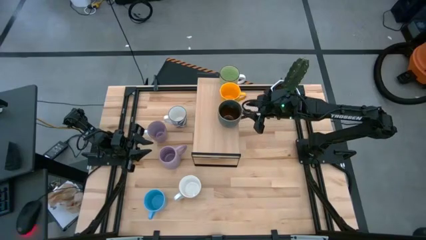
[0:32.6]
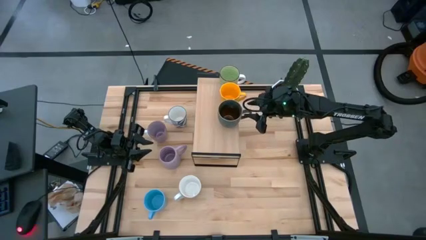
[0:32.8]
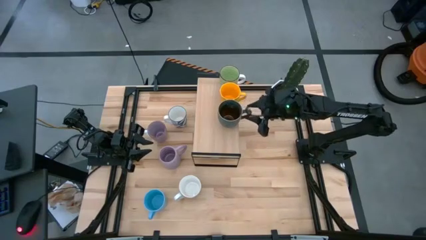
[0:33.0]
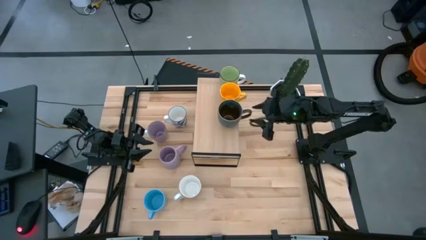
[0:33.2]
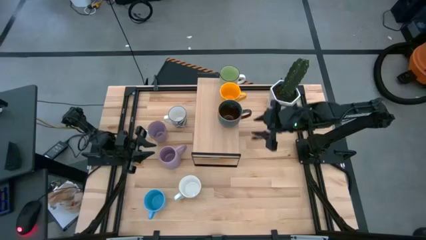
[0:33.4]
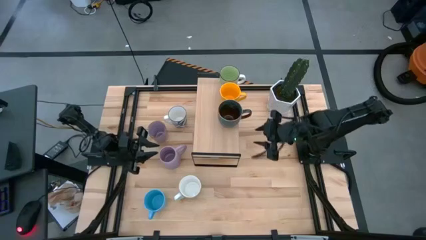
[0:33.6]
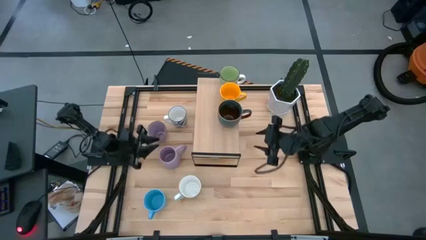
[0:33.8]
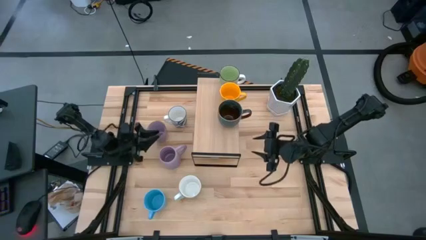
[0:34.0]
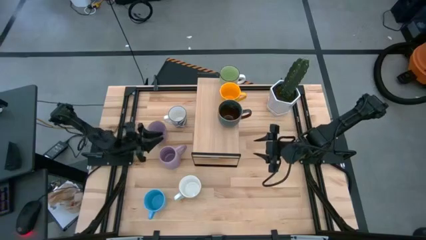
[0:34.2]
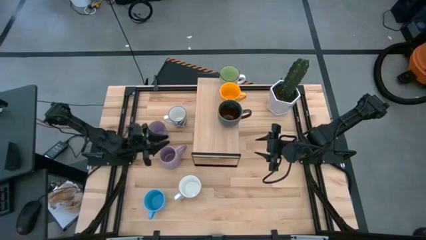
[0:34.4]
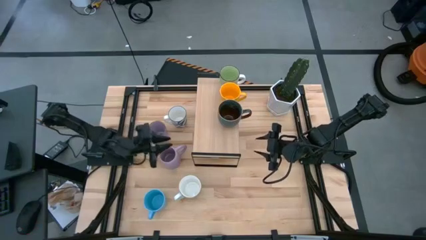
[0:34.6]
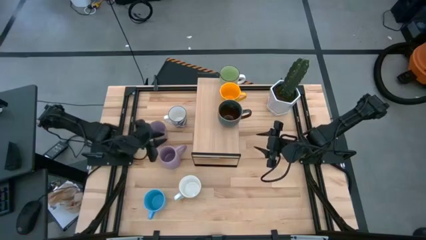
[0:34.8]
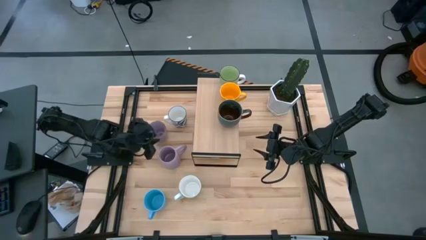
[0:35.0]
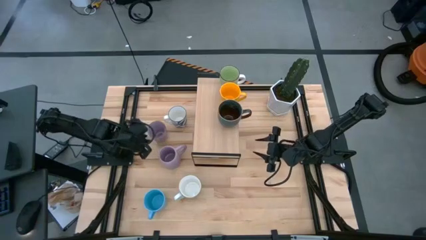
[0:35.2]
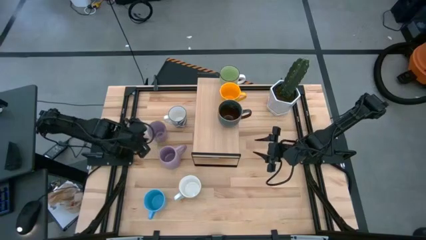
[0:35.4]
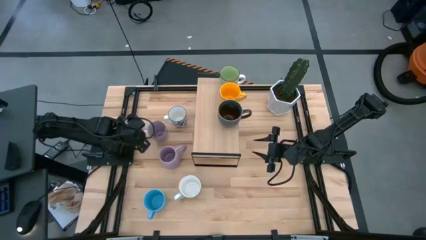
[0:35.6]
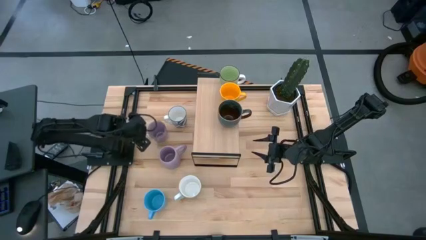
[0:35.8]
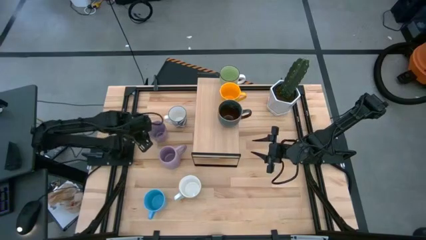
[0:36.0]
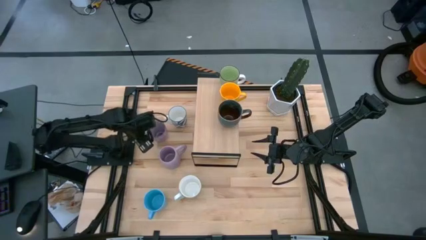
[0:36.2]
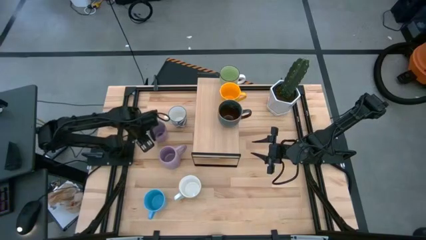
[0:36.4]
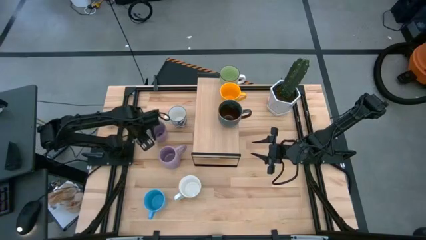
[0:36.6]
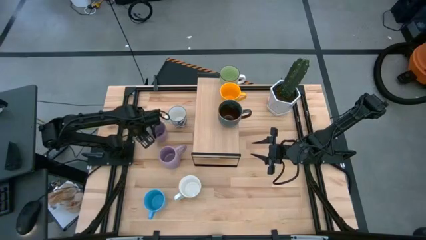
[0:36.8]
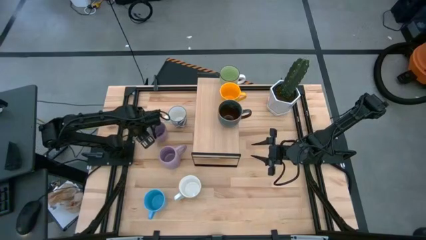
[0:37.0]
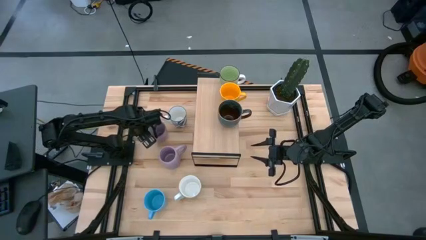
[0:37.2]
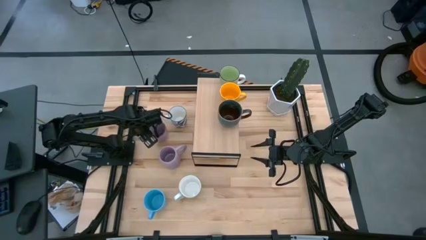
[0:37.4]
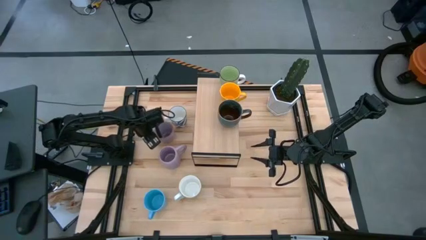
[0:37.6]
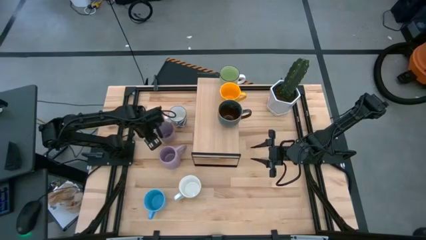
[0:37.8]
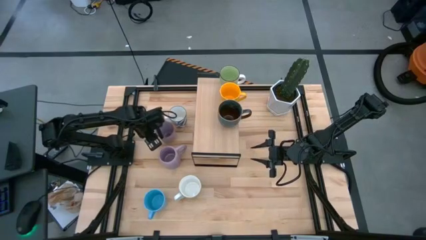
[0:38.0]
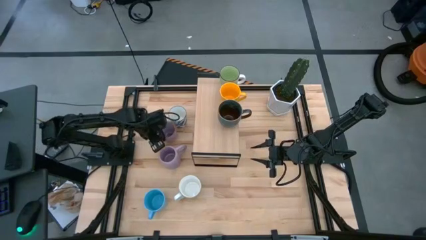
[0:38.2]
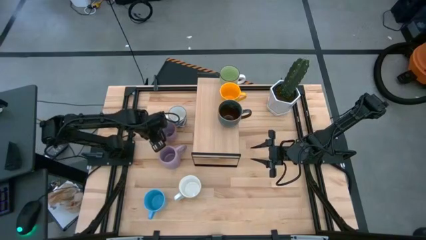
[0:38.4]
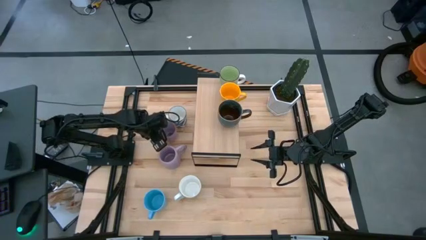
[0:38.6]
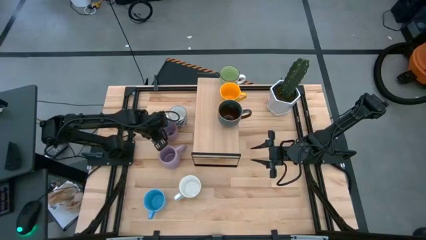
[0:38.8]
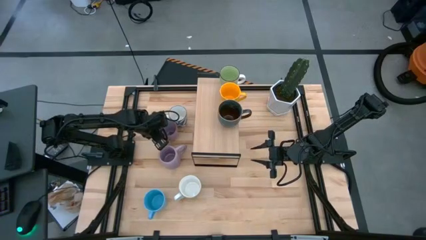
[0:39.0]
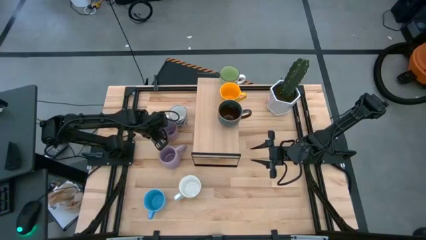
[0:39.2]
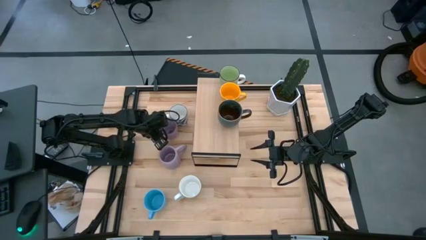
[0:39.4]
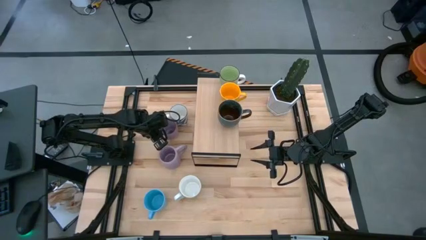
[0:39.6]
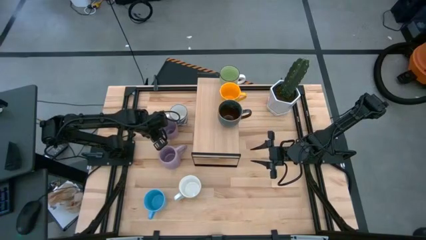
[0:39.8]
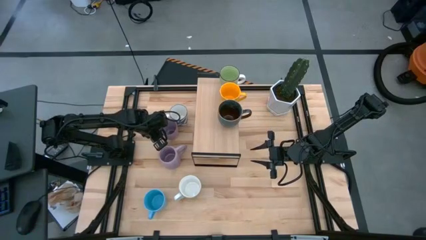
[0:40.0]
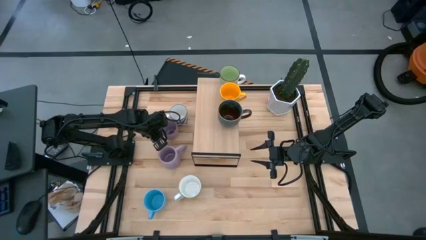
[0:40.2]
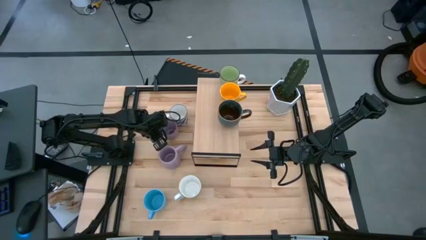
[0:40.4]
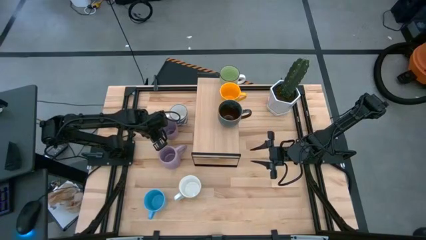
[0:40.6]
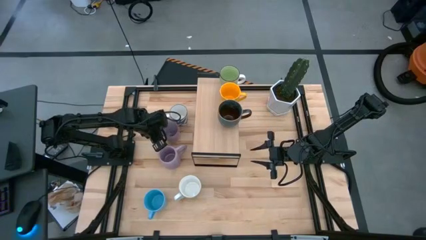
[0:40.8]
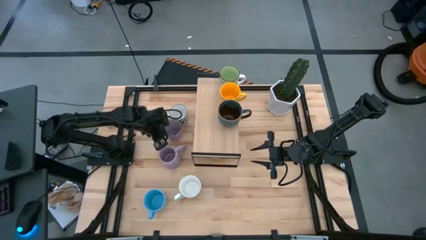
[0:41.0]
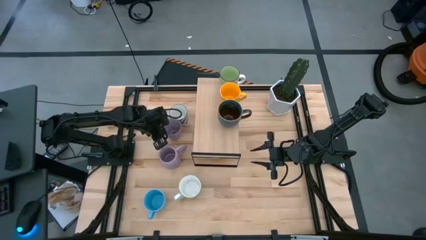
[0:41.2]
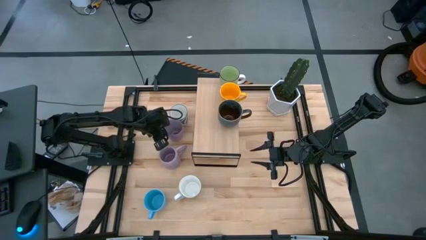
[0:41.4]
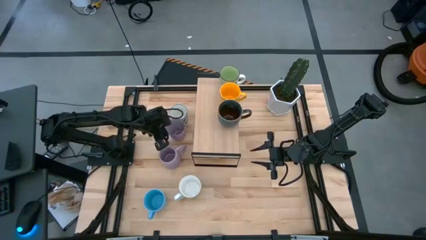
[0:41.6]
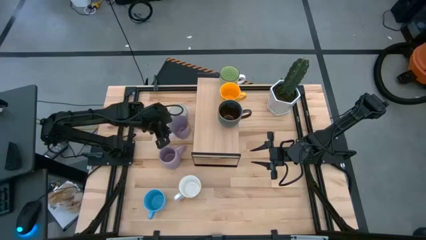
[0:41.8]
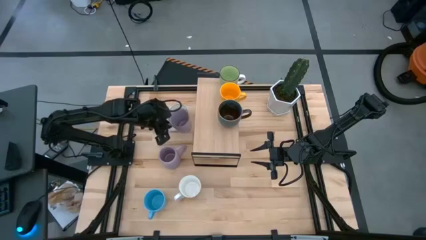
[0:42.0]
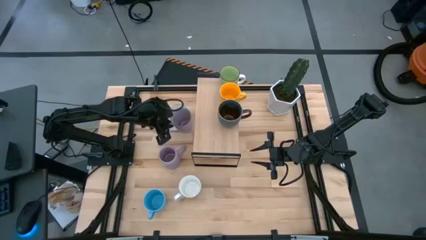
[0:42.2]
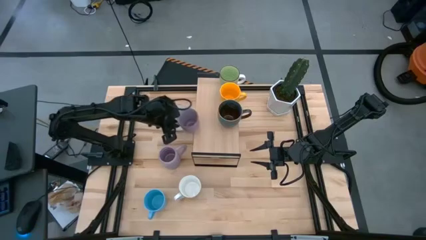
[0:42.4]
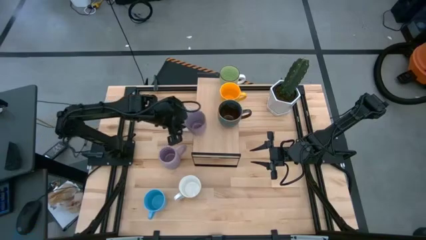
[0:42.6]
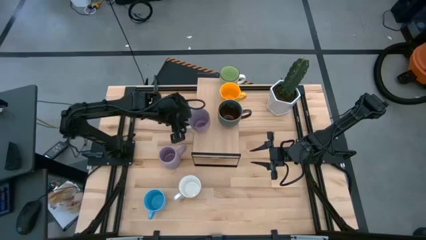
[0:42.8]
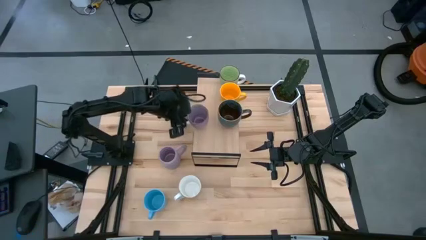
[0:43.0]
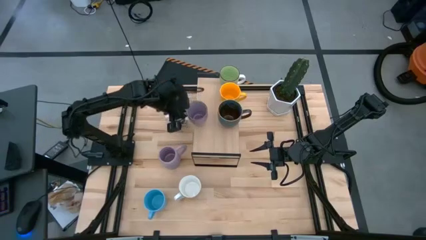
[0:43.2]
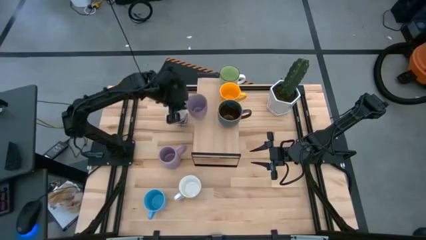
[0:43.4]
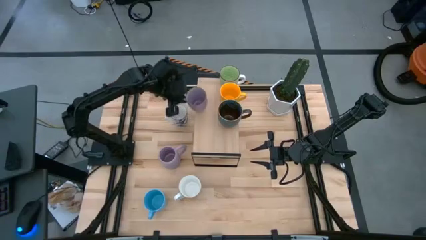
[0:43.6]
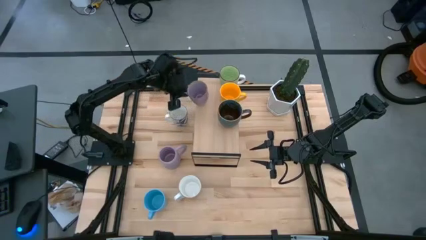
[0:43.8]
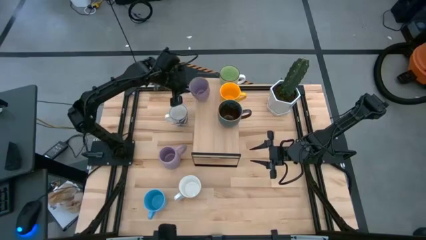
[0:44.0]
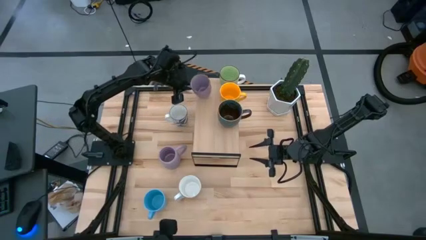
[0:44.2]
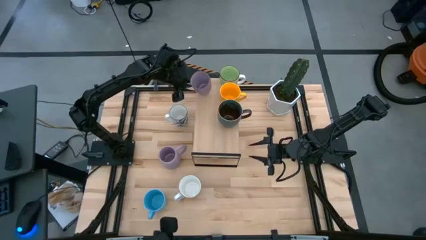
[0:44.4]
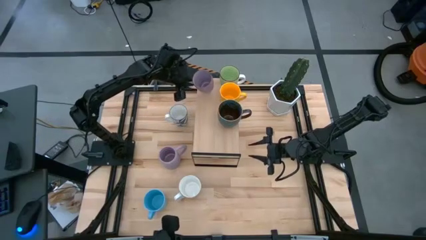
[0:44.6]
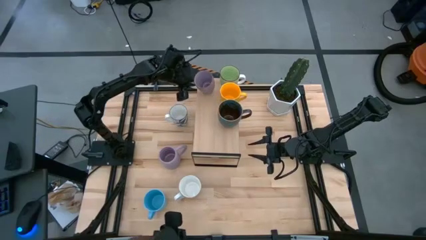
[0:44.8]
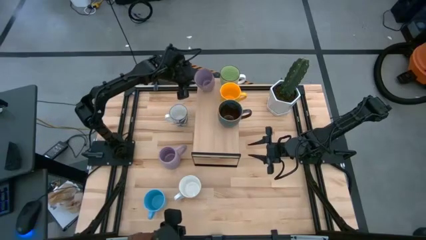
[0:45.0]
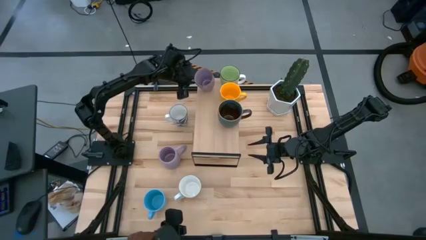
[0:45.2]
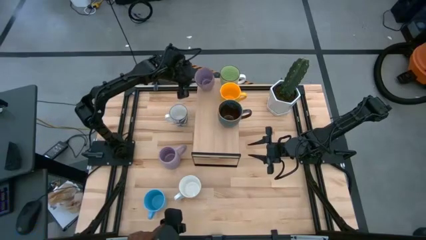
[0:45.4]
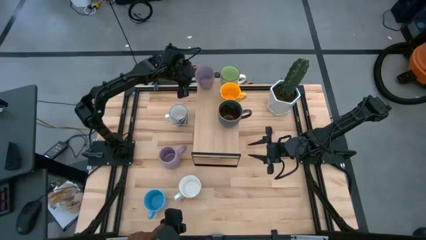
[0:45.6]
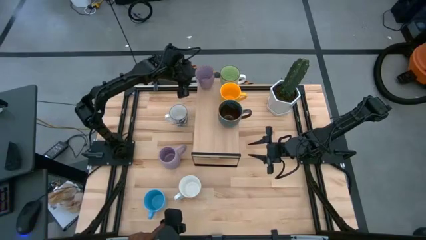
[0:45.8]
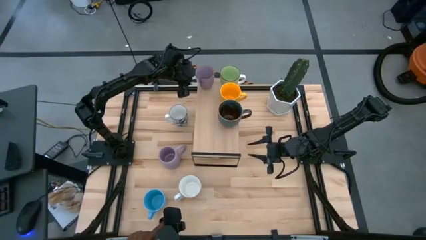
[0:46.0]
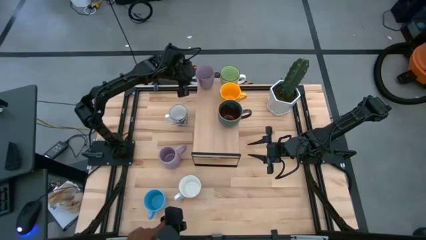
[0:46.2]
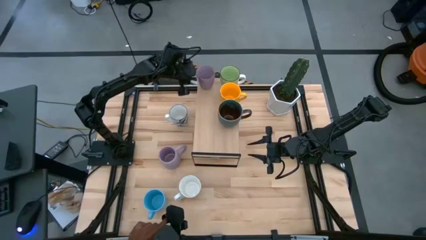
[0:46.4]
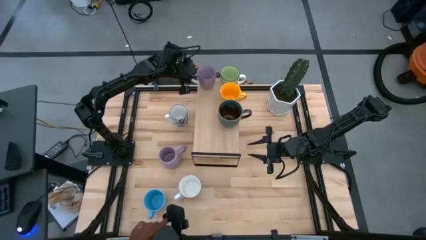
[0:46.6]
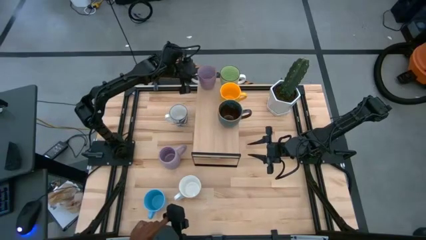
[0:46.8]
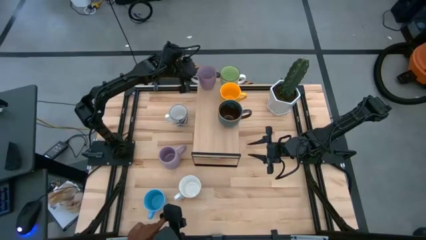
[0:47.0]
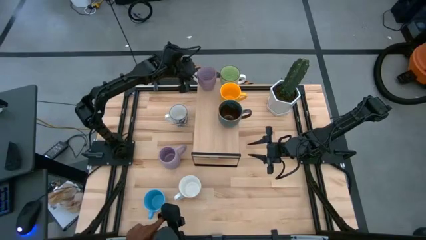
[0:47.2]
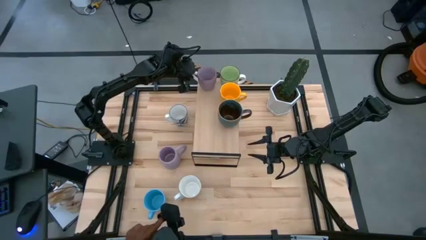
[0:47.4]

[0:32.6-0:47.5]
Task: Place coffee mugs
Put the top purple mug on the shelf

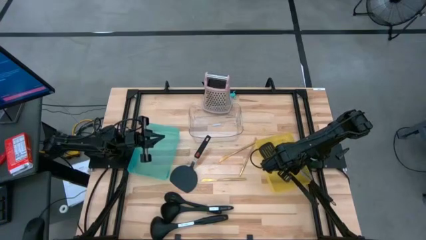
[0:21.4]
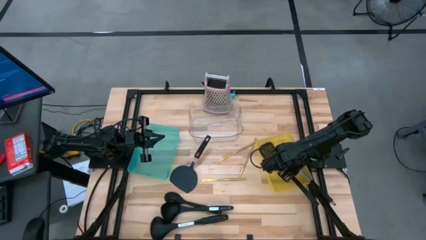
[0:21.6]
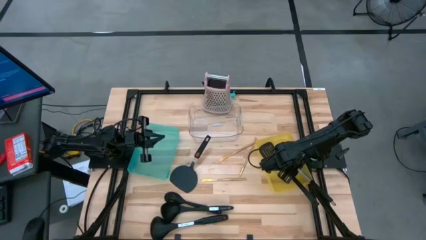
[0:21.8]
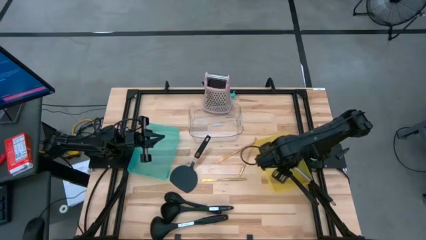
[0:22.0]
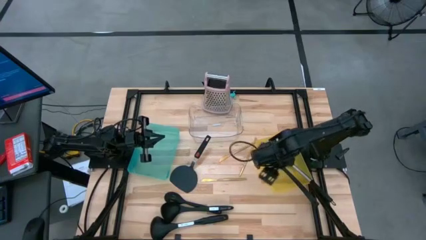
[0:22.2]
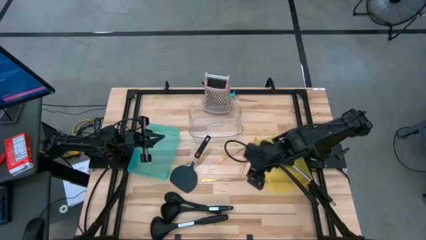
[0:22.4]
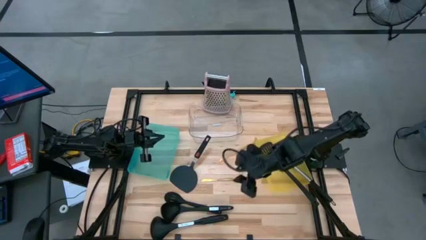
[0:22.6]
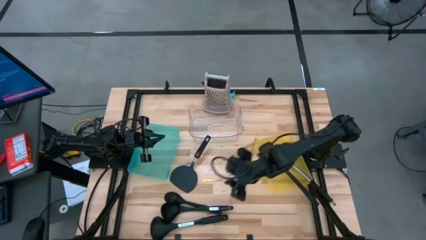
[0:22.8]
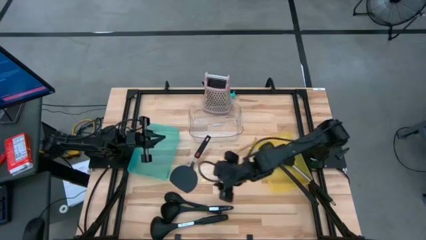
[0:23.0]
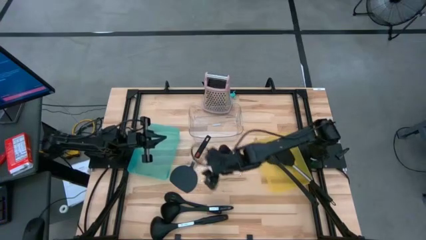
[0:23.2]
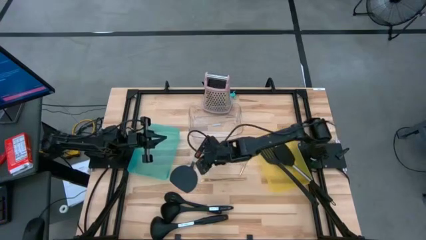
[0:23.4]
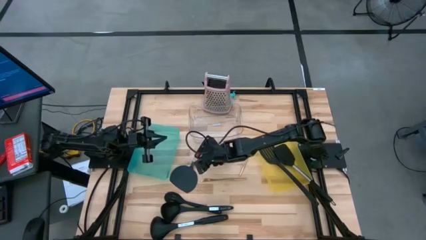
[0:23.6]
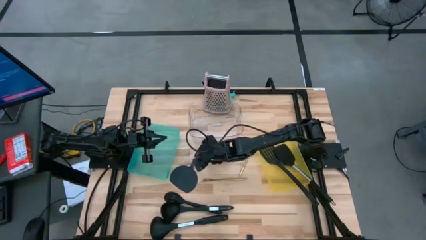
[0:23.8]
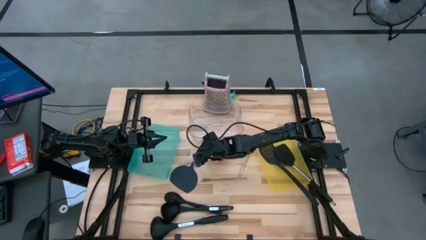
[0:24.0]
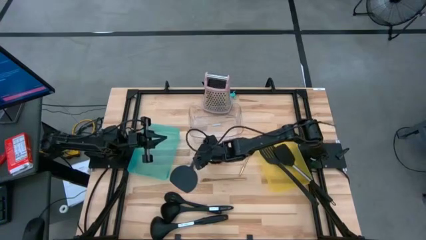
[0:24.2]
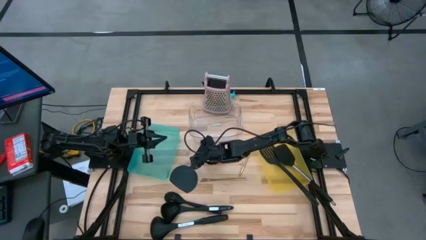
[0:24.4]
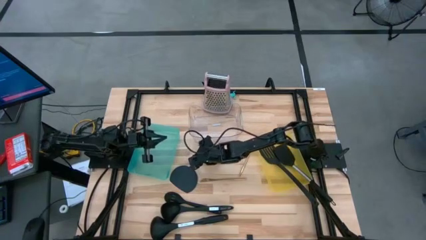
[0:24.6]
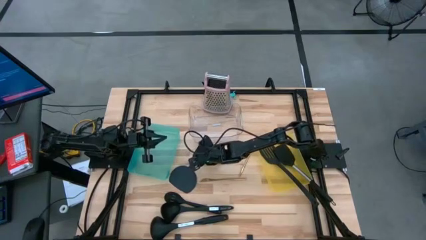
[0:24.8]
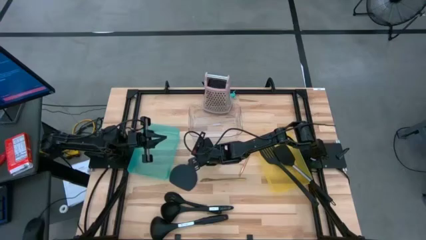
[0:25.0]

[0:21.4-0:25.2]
Task: Pick & Place Kitchen Items
Put the black spatula into the yellow bin
